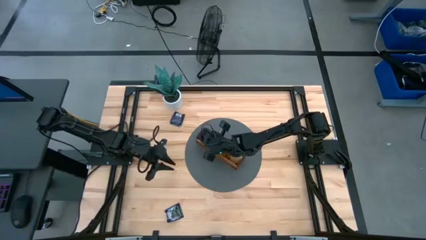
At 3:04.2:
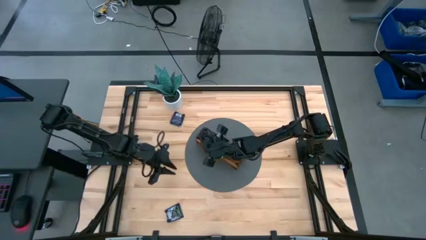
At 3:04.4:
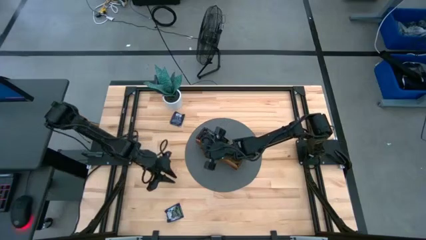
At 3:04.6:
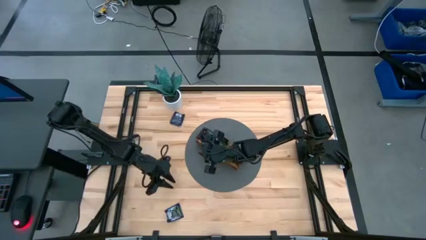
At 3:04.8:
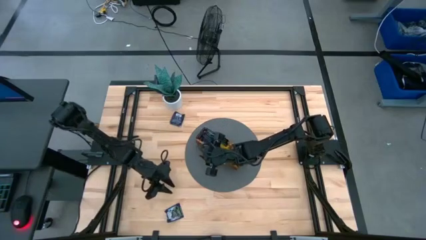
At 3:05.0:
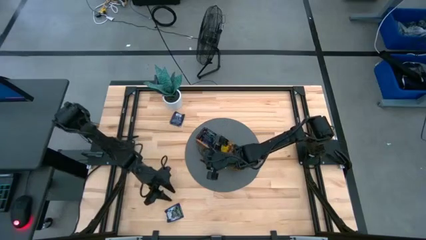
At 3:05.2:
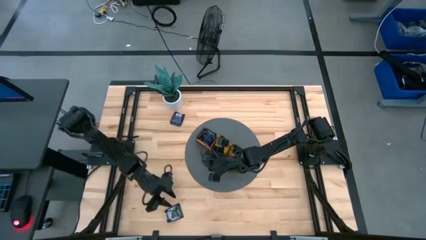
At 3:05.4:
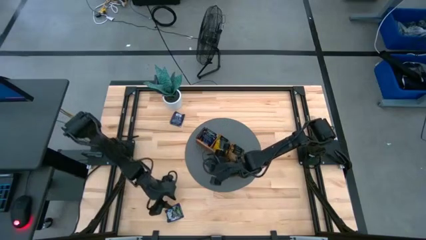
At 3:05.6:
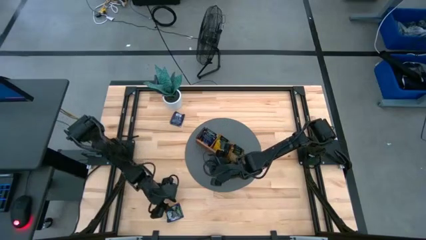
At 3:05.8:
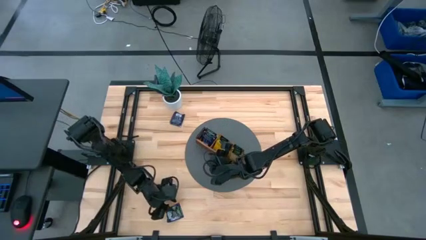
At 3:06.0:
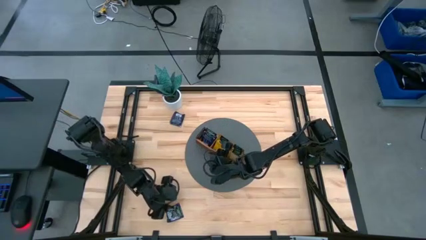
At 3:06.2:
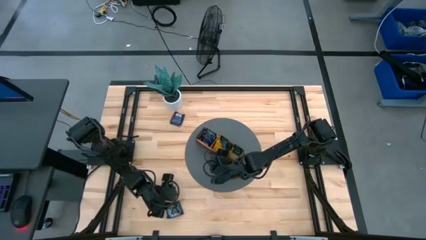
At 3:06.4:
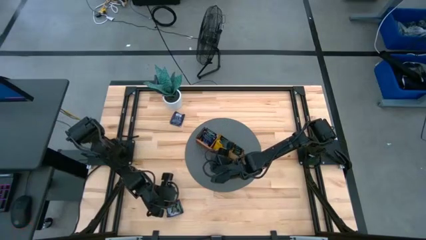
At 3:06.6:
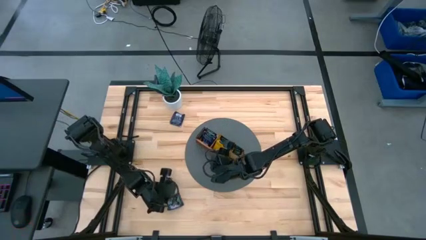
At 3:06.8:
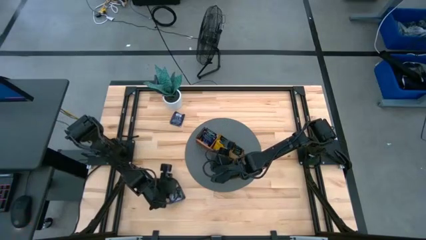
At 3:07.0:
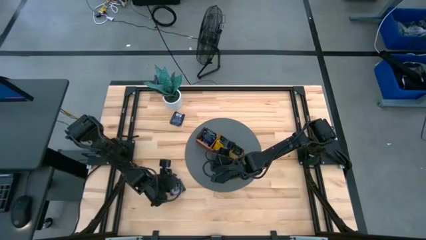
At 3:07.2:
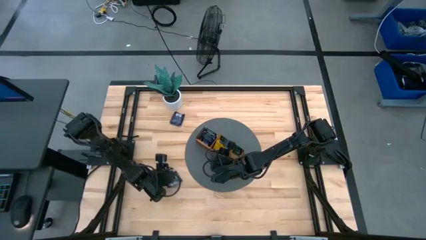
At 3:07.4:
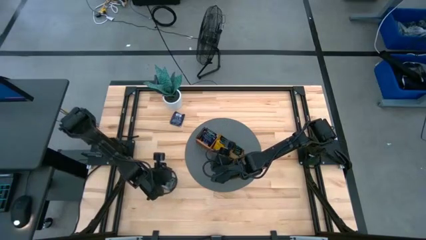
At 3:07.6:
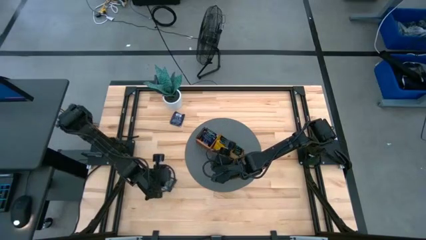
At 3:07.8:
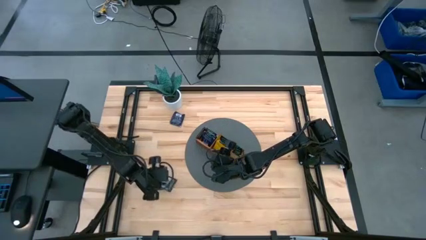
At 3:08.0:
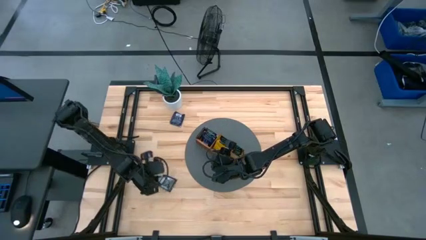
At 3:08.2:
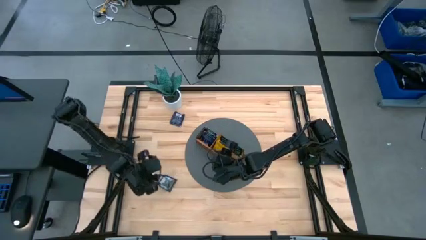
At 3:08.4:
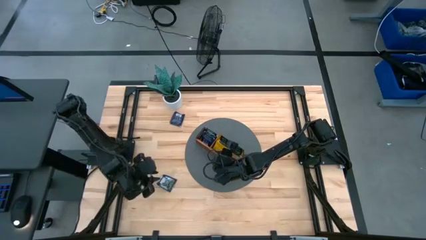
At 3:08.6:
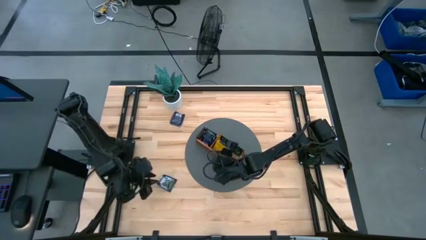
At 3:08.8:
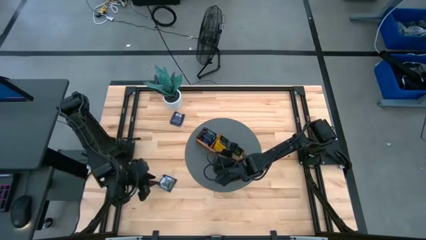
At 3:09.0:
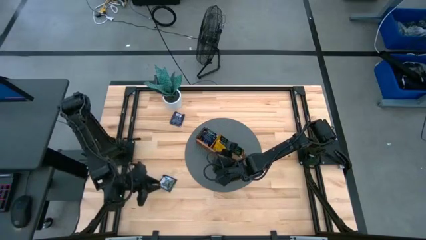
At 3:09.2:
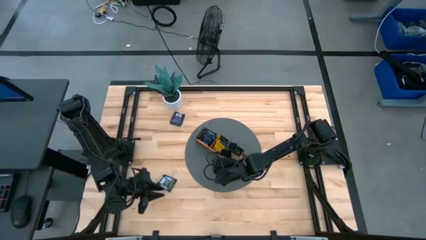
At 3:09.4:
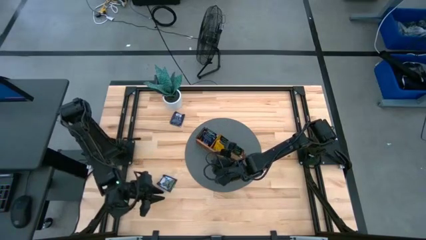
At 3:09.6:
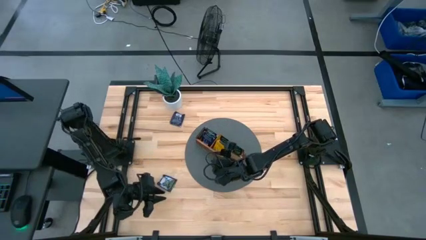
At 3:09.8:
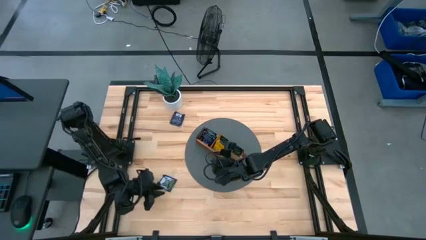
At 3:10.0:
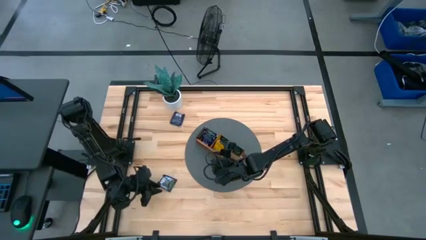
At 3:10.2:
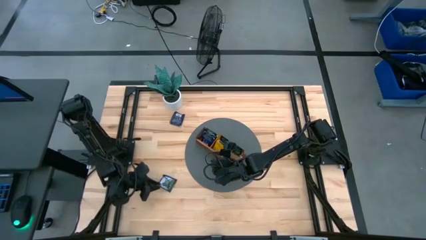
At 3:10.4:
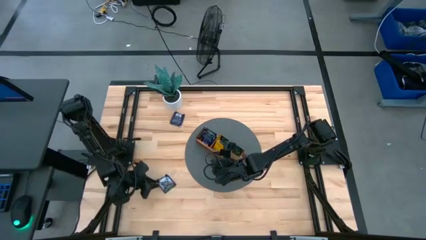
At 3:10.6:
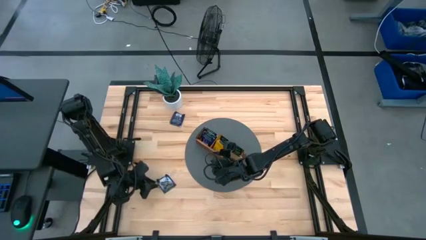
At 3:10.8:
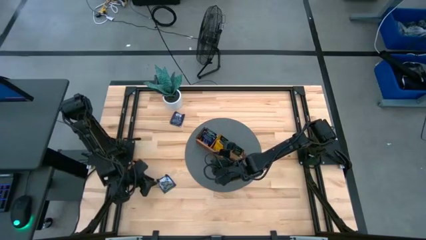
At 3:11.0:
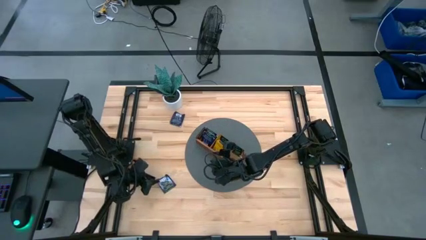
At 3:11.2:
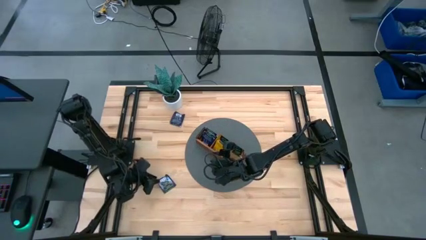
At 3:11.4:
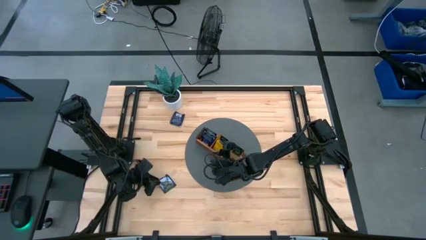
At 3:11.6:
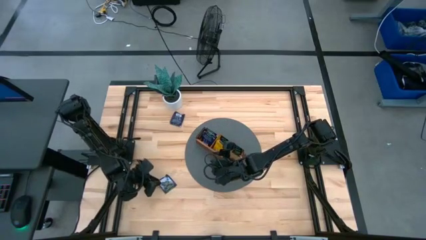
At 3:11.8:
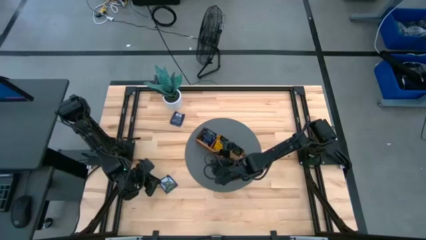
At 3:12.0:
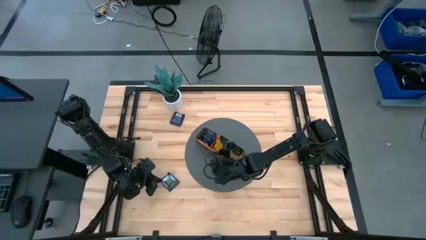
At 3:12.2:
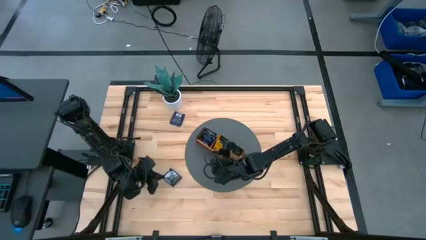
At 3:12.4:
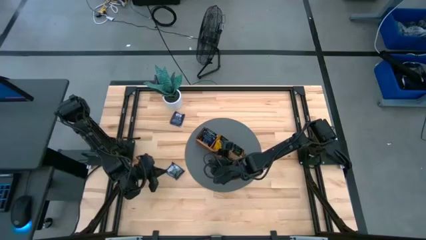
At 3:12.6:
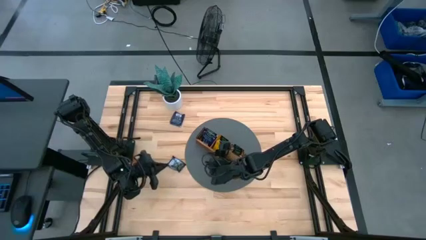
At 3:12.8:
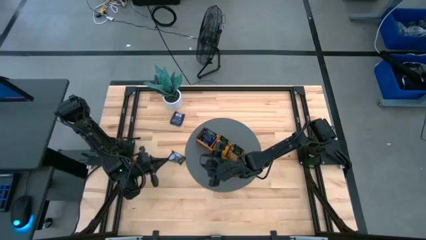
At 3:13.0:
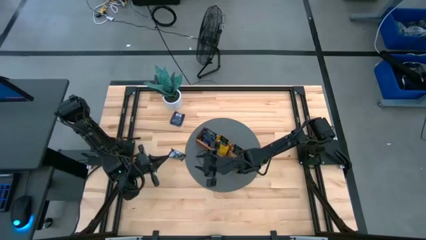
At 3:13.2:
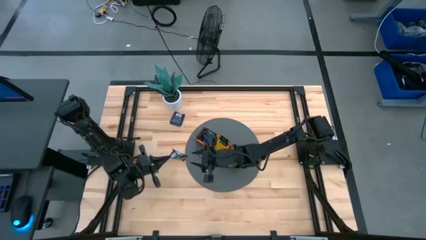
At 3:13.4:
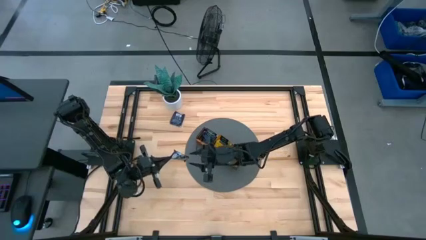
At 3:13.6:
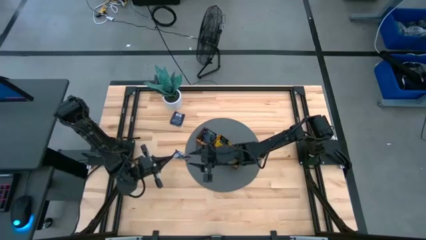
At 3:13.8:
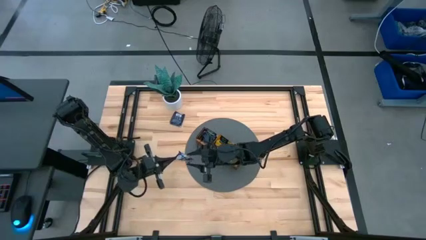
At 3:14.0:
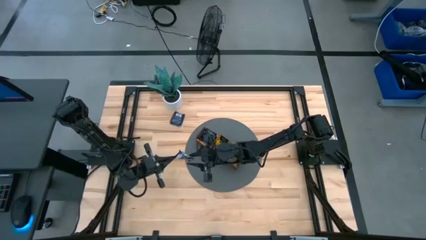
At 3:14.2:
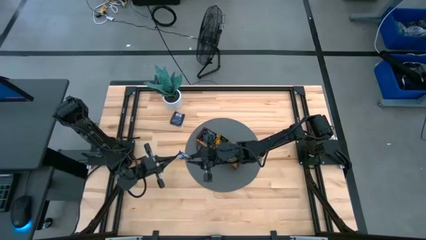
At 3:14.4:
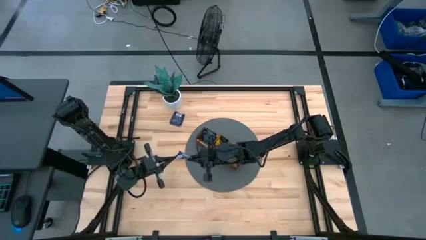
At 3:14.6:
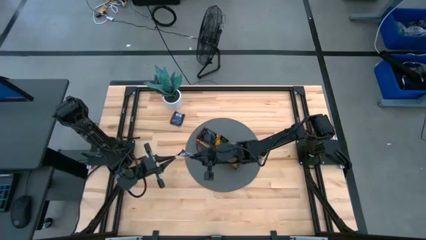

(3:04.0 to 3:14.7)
Task: Pick & Place Tea
Put the dark blue tea bag into the left section of the wooden organizer
